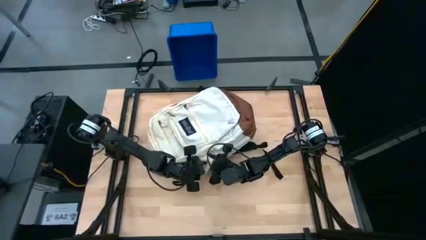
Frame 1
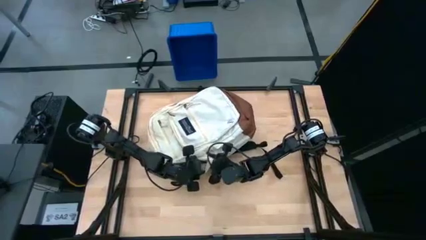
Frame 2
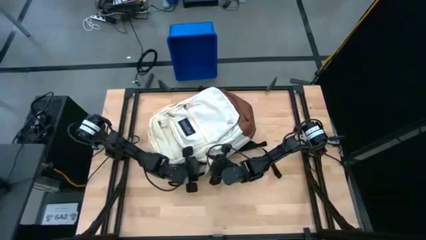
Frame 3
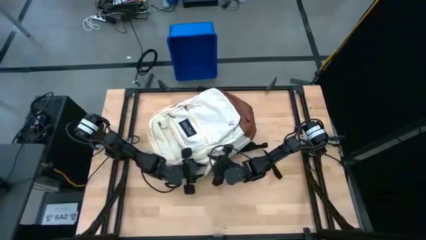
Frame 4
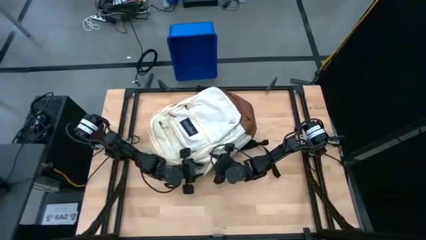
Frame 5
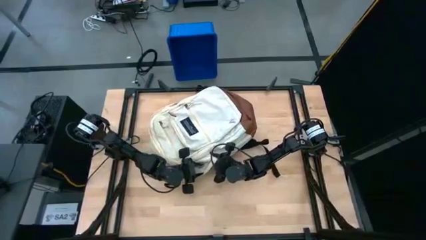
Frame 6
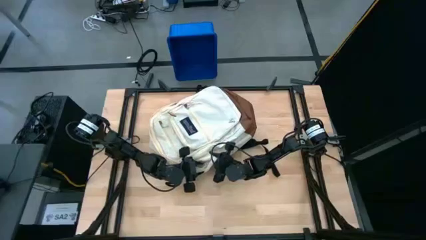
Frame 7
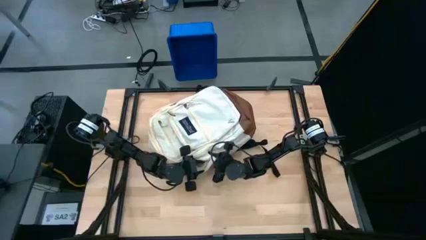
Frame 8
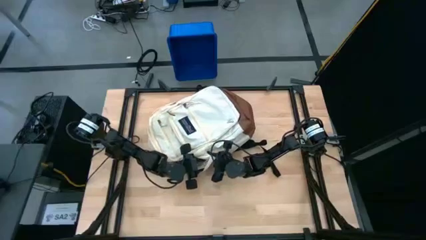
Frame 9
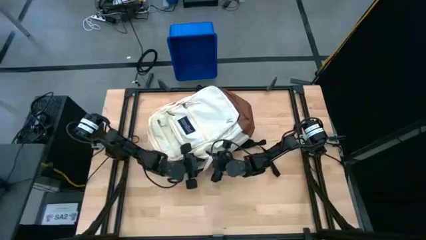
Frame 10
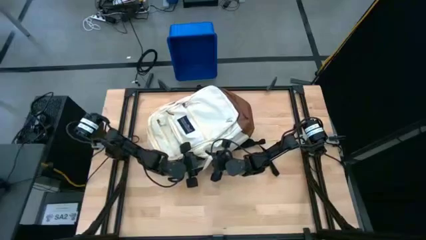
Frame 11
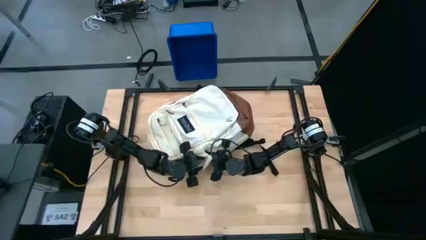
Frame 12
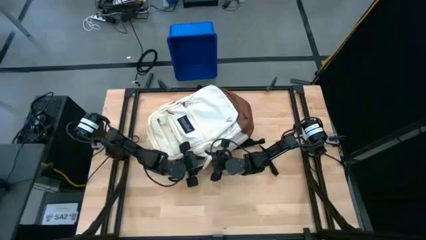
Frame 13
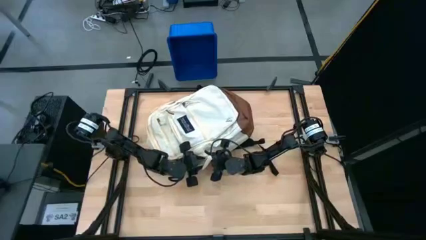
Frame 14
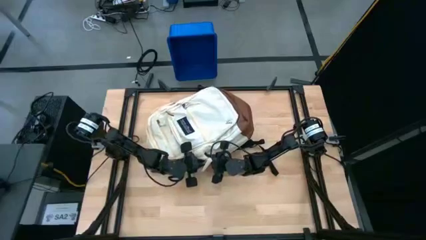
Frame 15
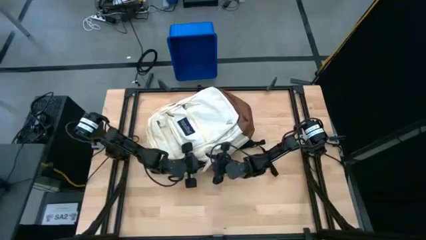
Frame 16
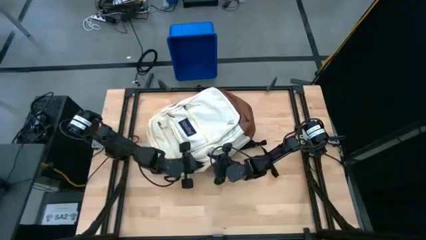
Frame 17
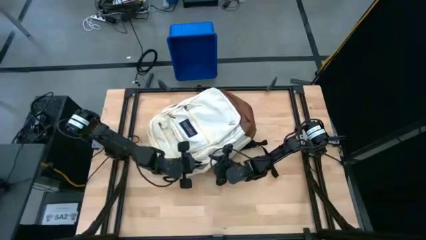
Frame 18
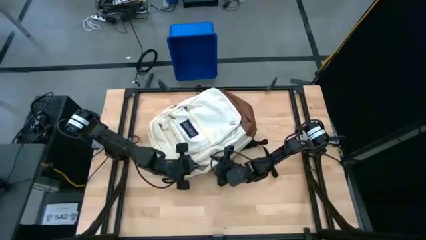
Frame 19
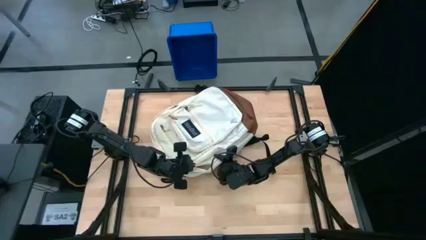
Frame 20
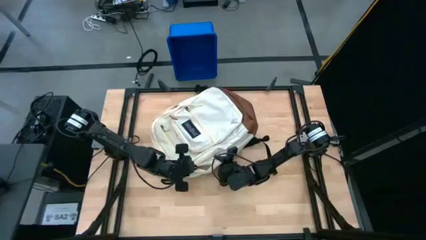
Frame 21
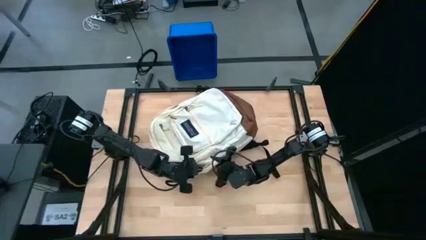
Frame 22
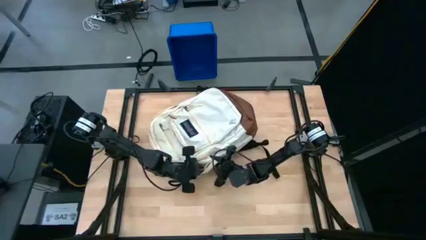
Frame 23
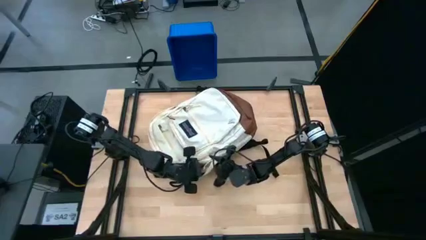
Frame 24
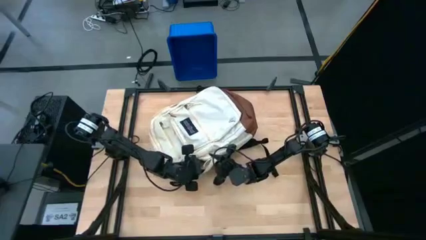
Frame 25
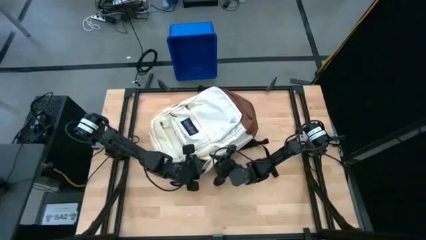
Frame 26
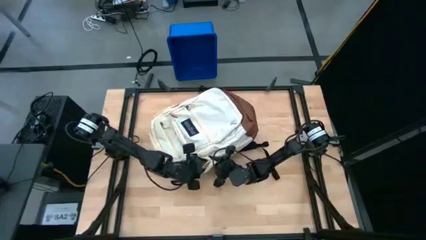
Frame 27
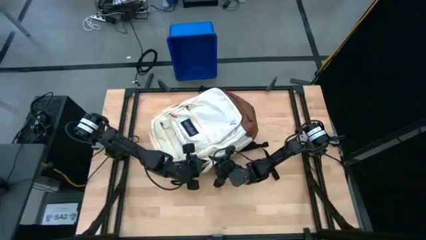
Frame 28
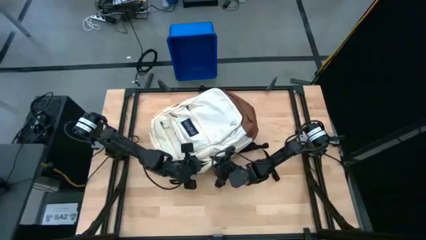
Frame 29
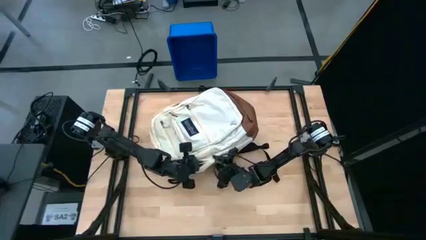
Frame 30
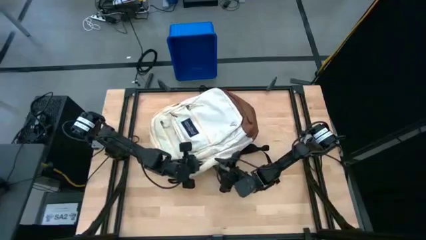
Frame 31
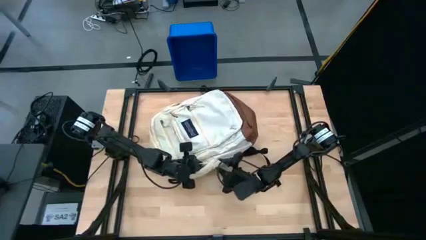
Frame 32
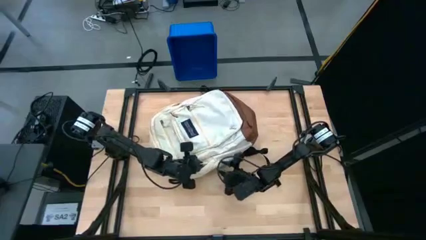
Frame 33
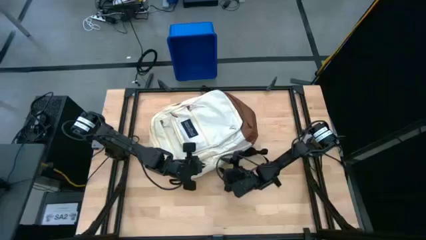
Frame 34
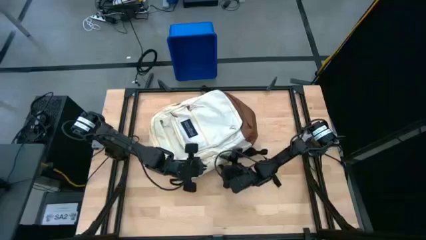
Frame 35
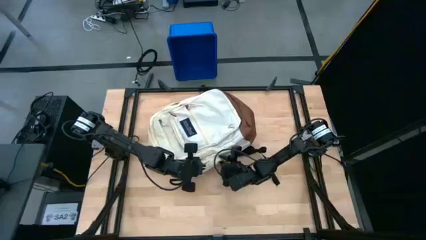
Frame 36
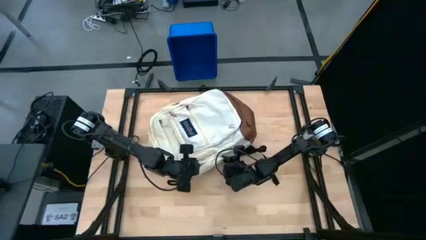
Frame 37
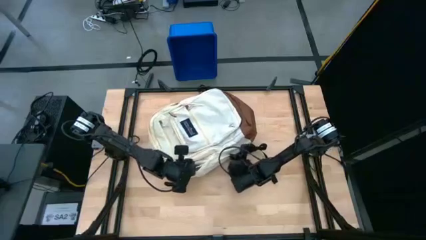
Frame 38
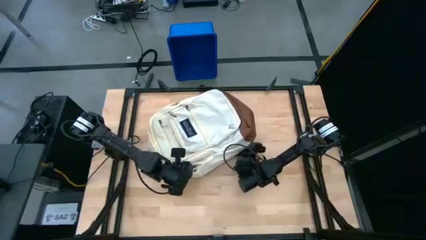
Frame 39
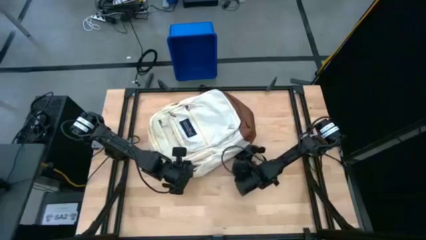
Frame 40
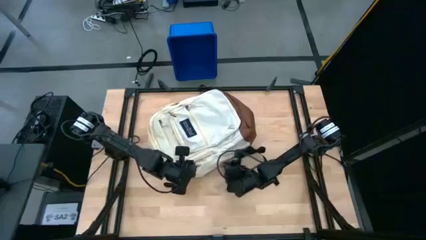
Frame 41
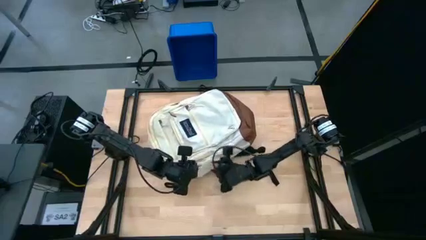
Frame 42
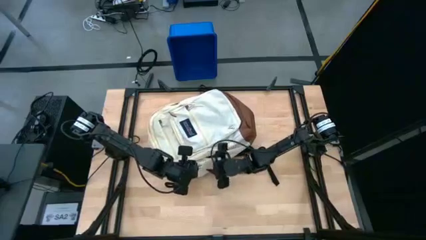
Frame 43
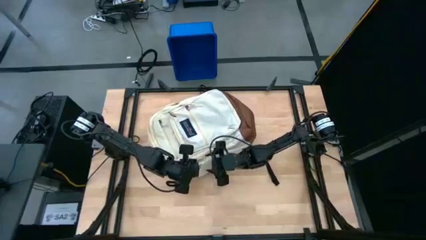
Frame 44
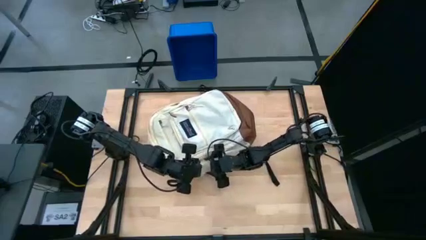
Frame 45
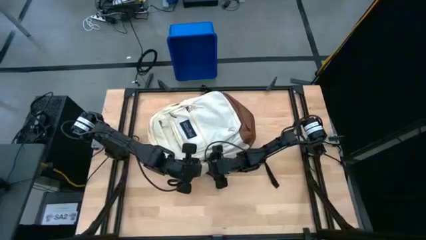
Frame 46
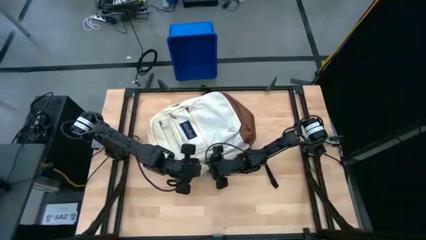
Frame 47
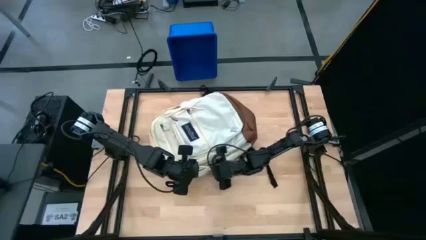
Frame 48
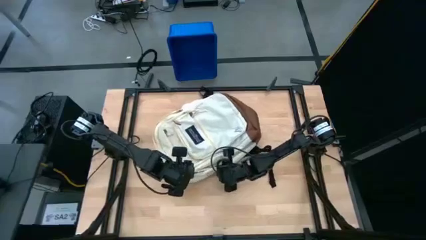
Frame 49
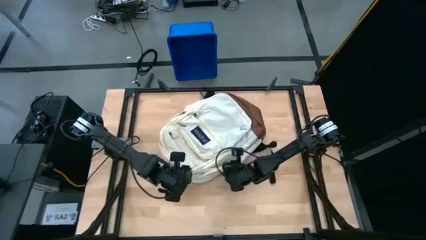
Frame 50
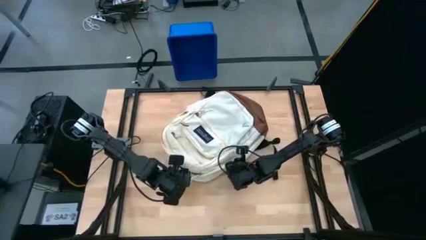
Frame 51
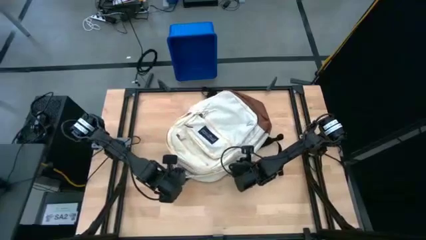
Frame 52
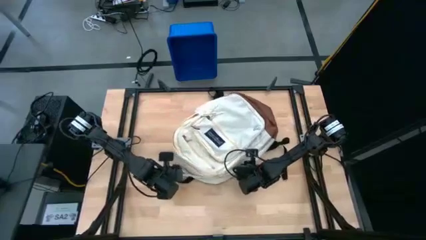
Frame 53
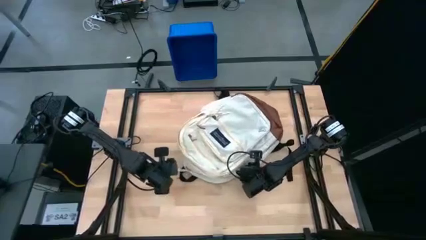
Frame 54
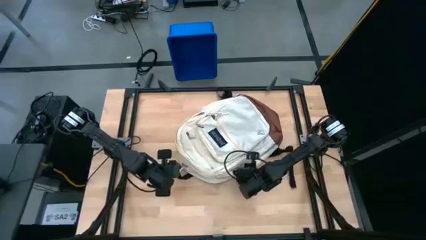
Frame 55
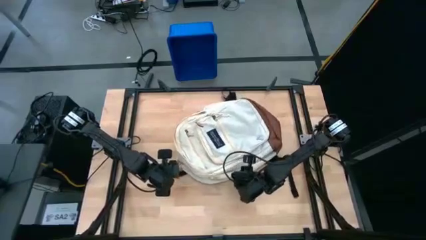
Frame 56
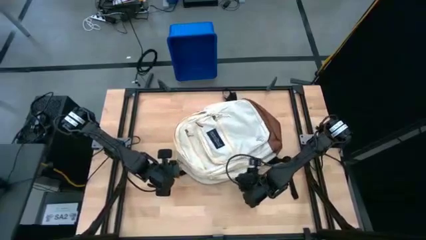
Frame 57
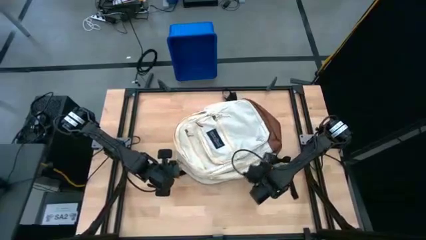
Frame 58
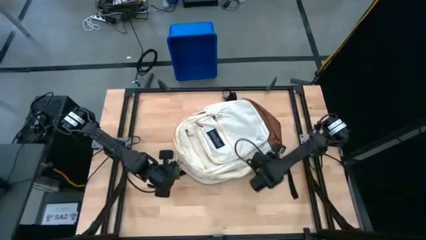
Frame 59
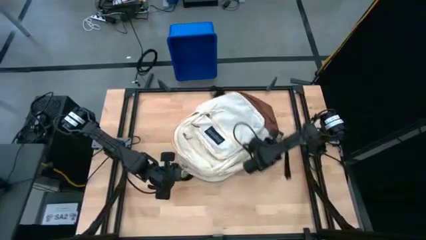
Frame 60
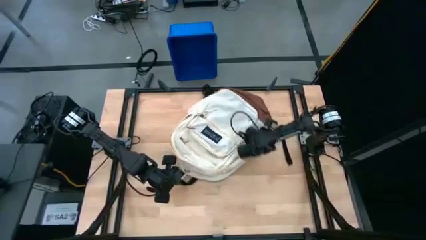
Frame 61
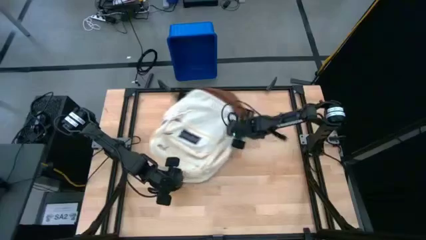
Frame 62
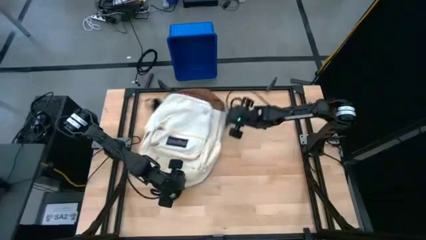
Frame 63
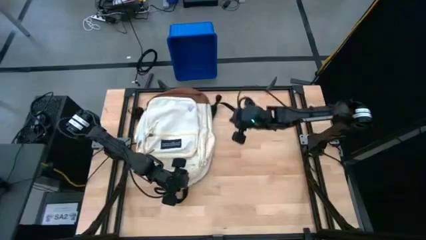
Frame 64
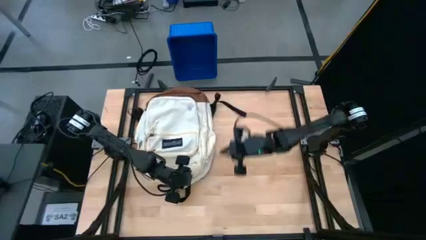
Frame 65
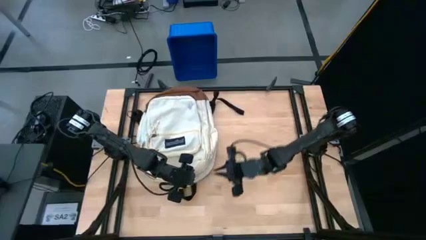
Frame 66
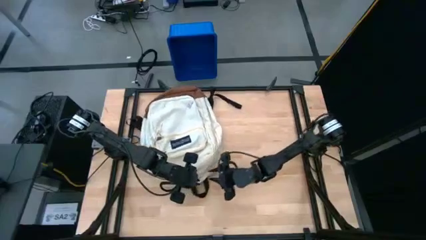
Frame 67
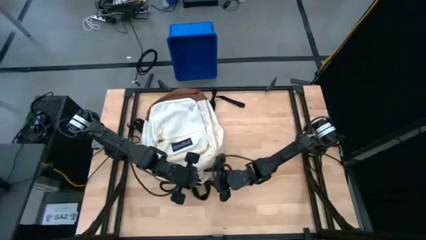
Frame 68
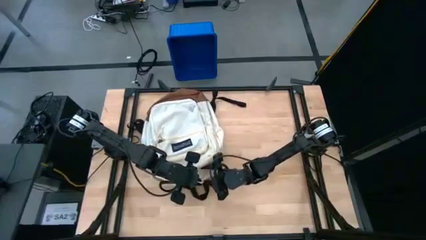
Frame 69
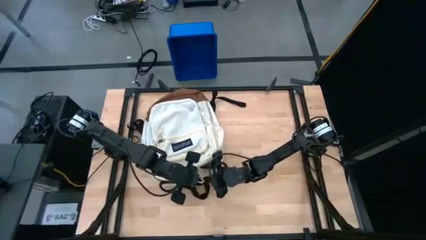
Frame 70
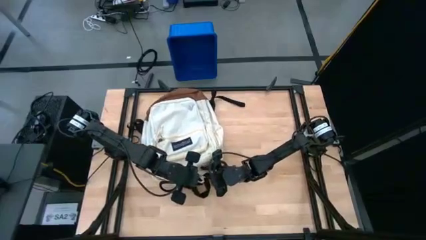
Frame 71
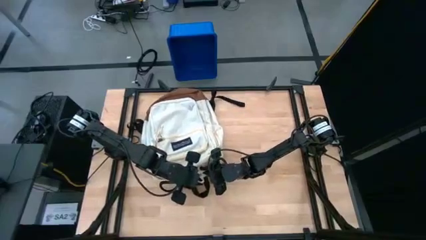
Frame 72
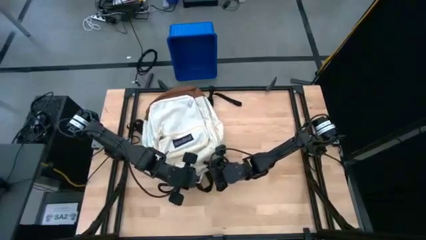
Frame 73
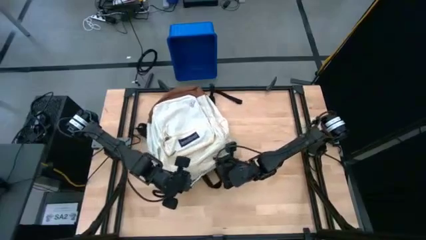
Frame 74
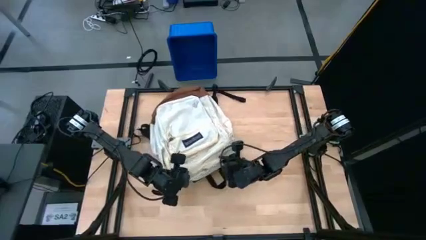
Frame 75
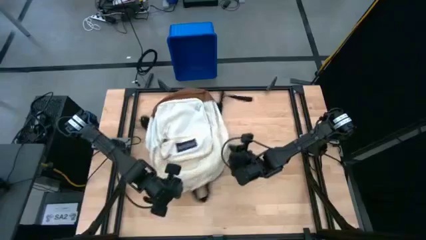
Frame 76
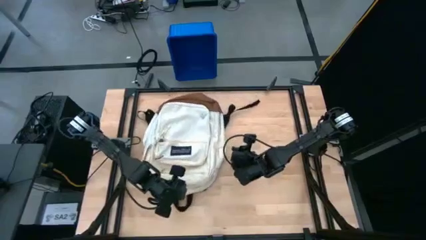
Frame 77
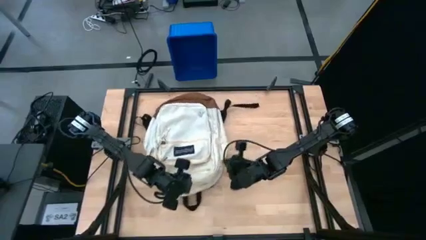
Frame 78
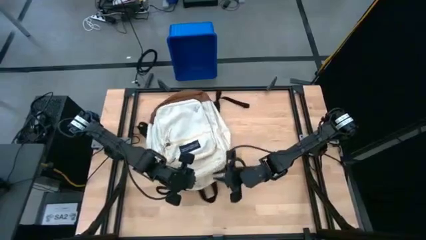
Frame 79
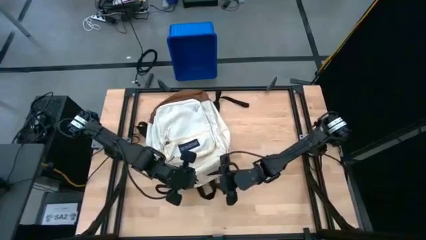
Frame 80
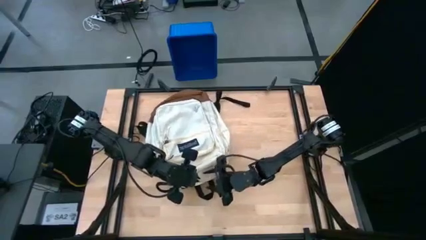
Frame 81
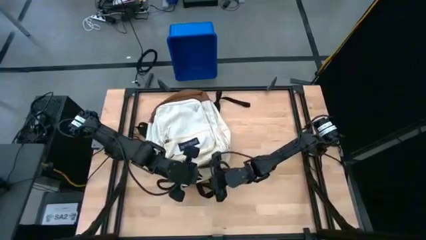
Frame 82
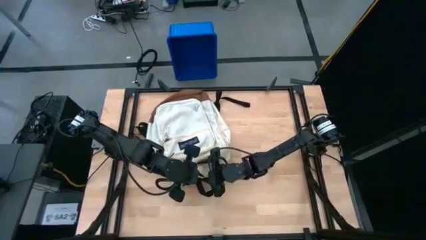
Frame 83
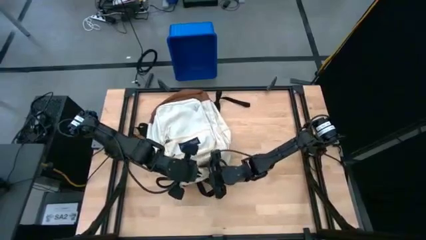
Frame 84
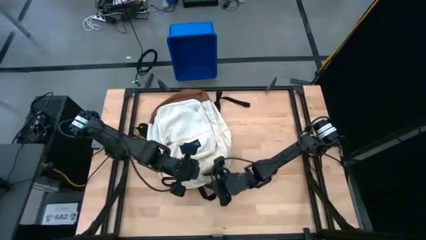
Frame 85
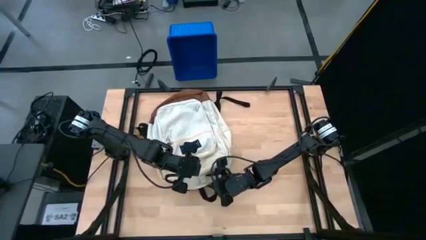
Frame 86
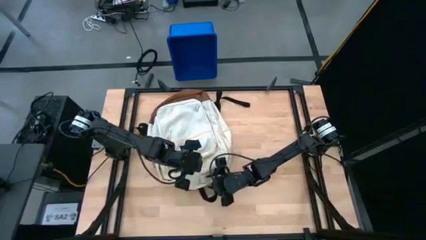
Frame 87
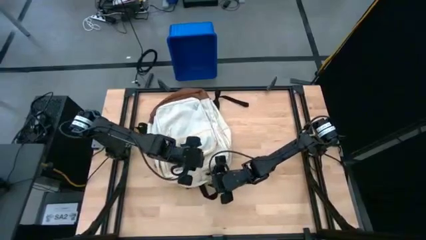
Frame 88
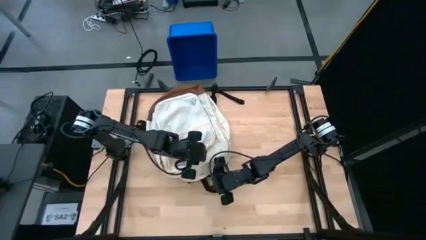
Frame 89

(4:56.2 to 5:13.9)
Task: Unpack backpack
Close the white backpack
